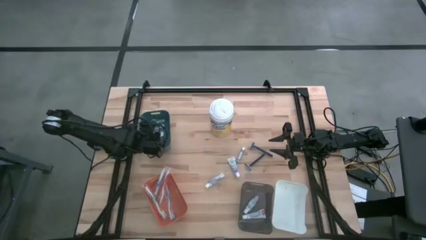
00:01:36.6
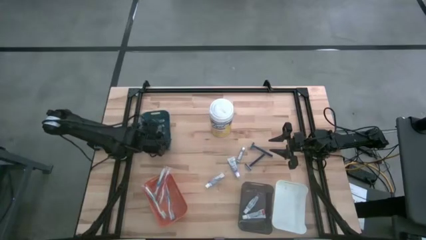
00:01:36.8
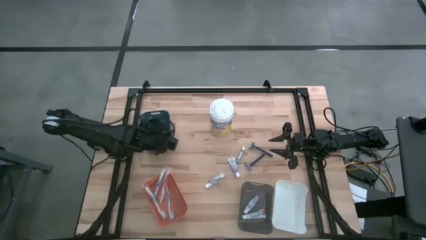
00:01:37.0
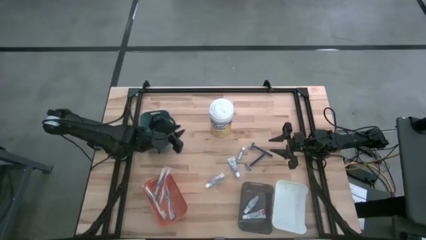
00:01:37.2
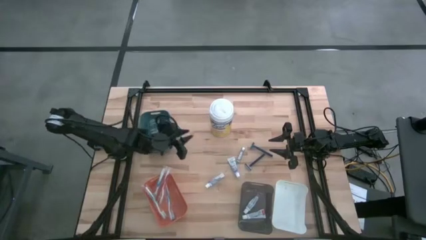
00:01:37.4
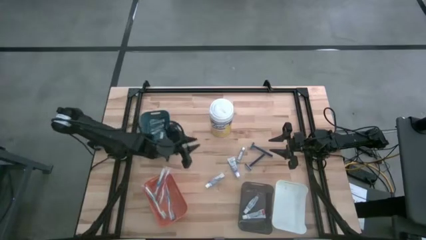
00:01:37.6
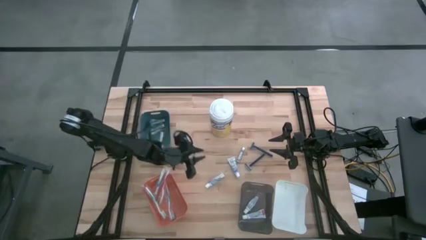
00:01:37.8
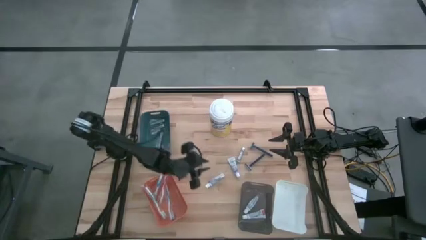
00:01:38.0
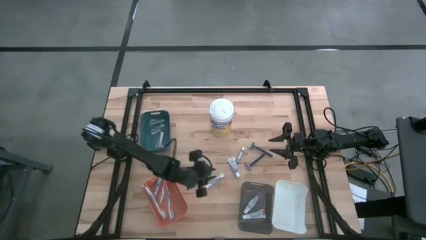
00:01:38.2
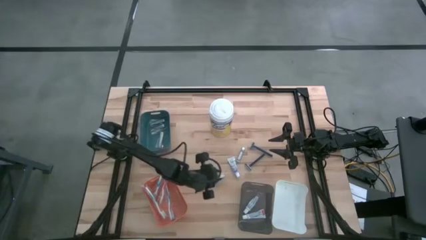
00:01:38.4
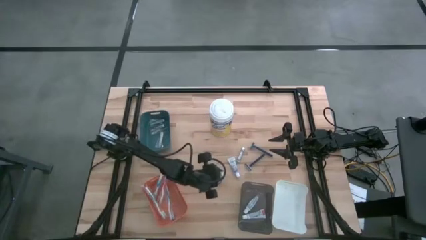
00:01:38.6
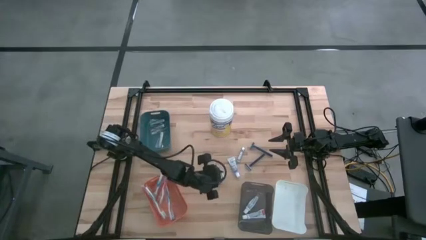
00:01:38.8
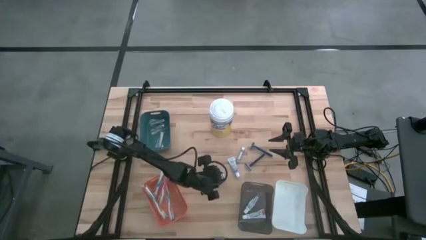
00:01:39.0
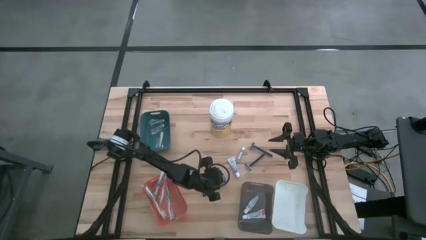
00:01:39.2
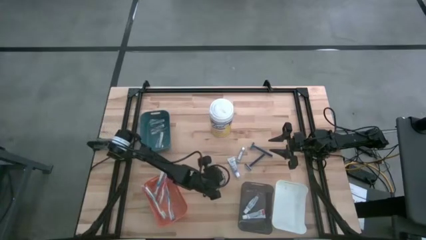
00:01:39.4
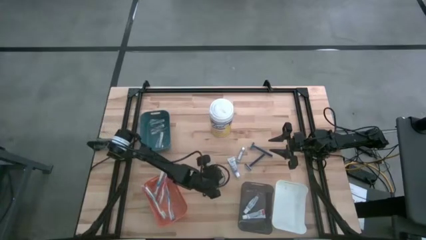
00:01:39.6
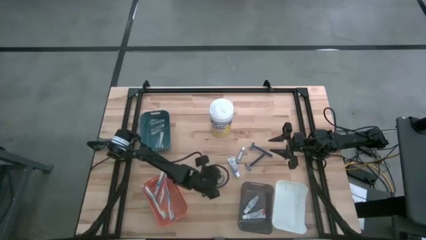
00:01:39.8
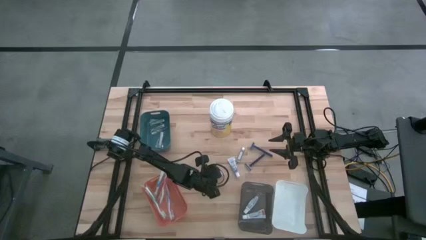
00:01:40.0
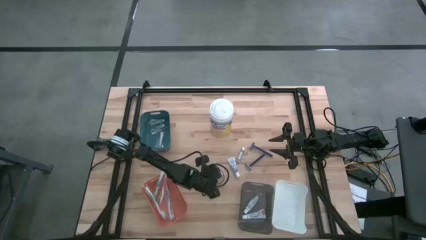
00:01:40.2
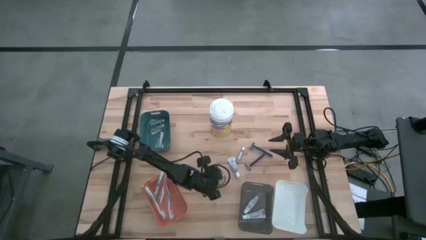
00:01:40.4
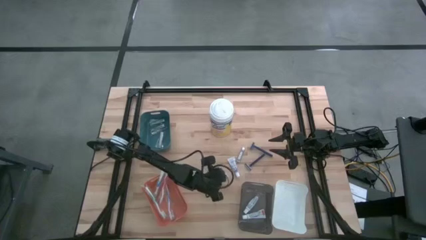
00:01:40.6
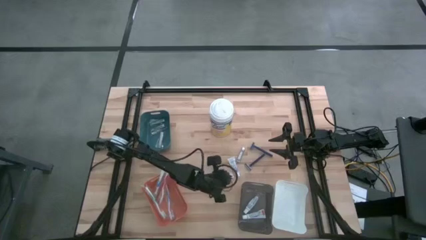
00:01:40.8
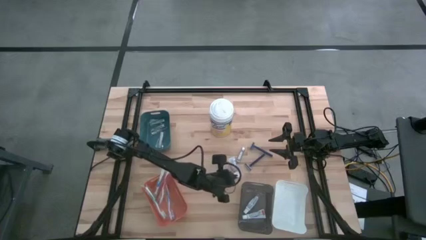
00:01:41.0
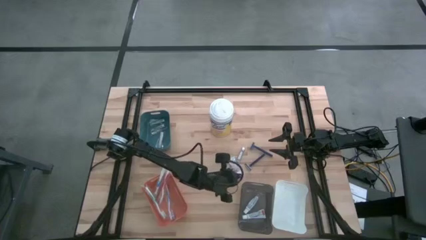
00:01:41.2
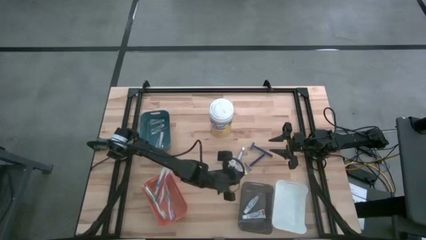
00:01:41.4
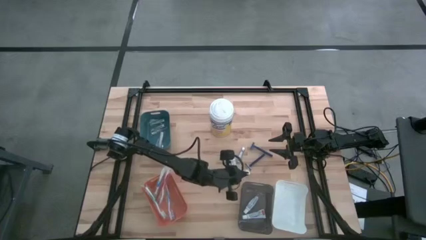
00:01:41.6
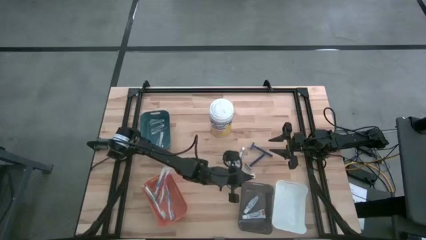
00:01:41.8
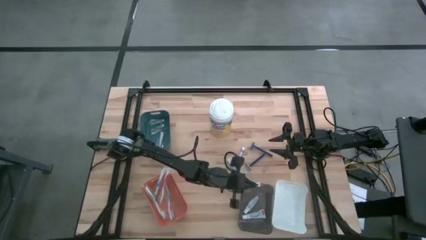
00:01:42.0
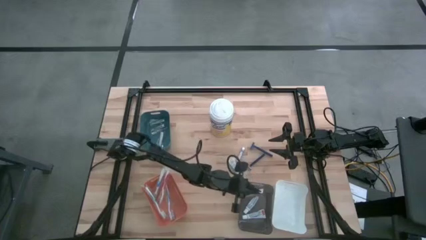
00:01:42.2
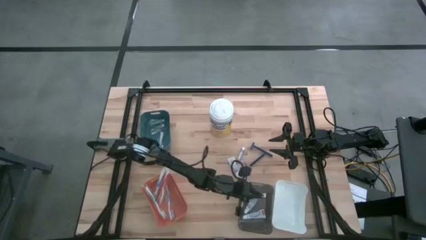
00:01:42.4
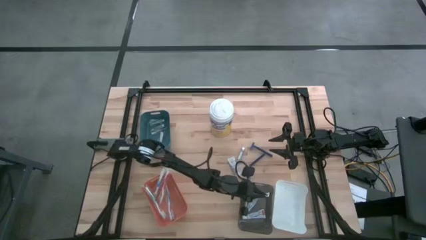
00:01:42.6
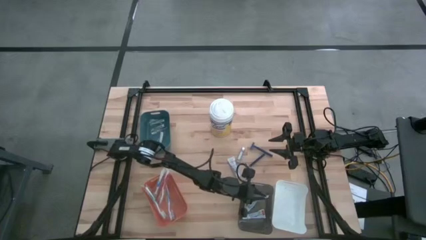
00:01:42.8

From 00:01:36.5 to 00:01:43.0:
Task: Pick & Place Travel size toiletries
Put the white toothpaste into the black bin

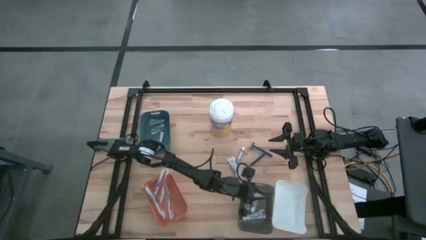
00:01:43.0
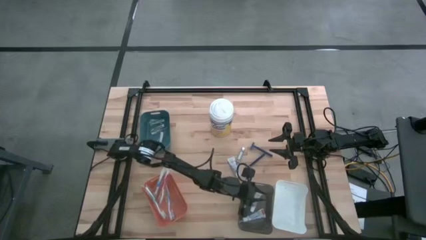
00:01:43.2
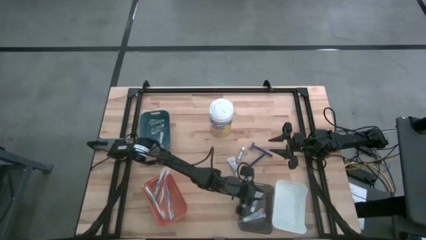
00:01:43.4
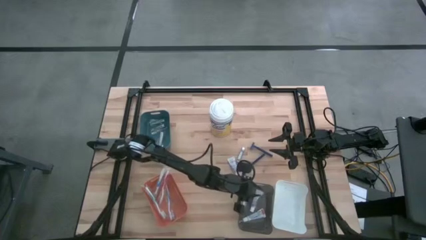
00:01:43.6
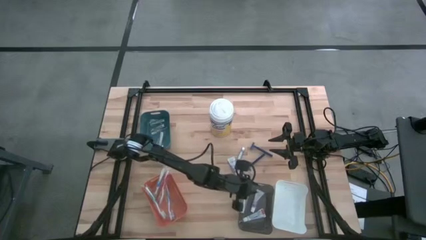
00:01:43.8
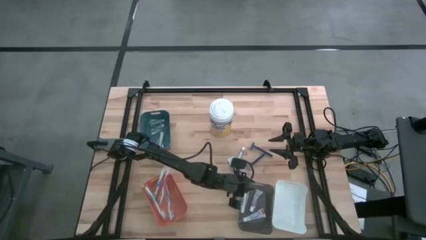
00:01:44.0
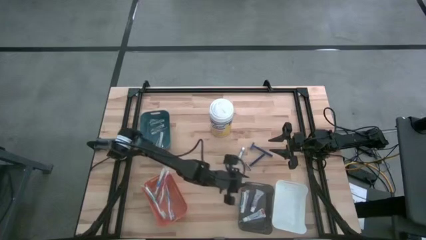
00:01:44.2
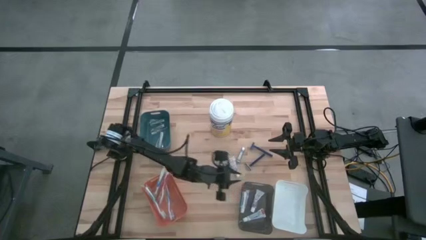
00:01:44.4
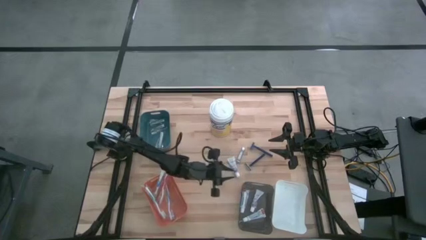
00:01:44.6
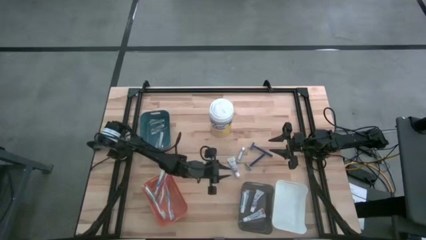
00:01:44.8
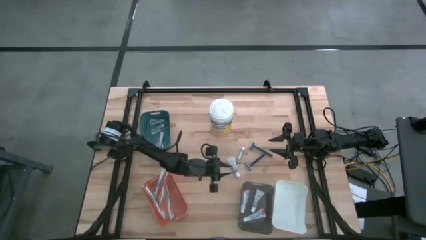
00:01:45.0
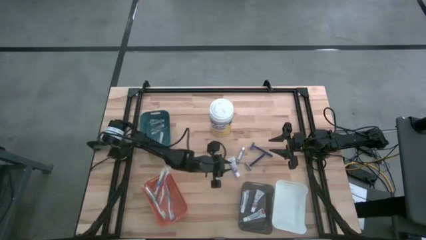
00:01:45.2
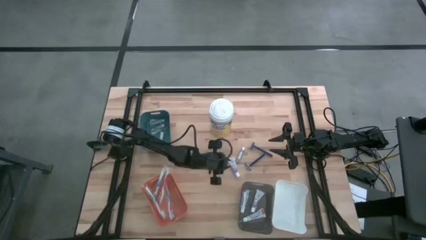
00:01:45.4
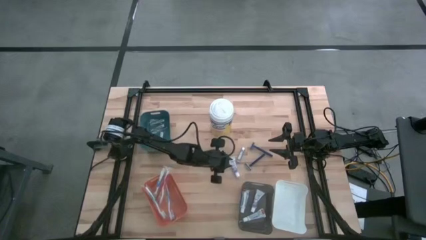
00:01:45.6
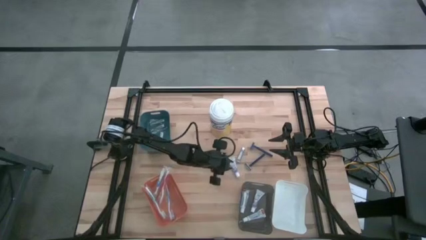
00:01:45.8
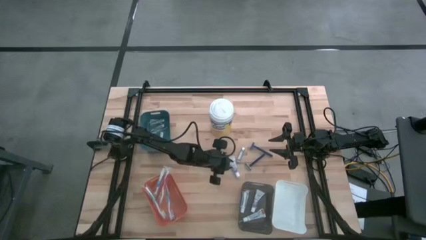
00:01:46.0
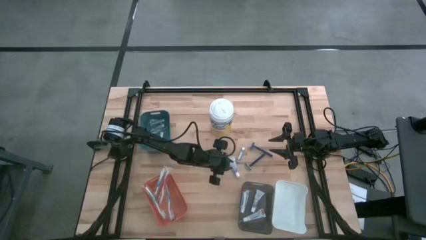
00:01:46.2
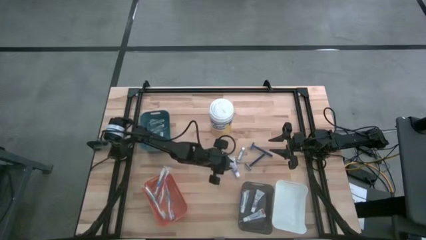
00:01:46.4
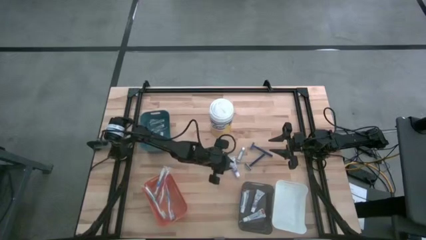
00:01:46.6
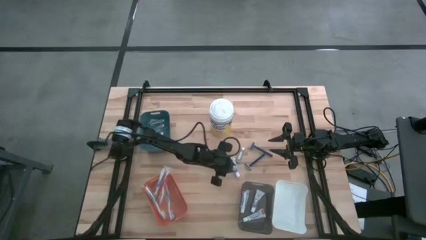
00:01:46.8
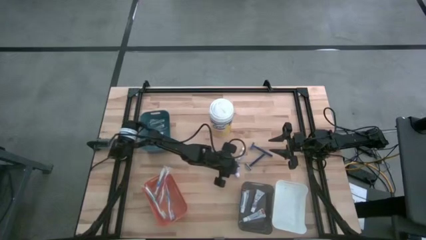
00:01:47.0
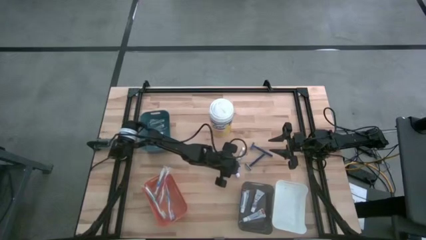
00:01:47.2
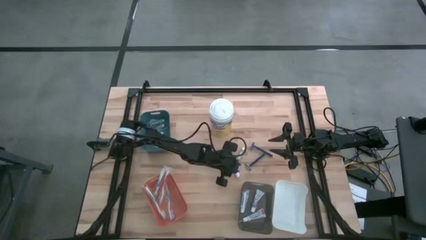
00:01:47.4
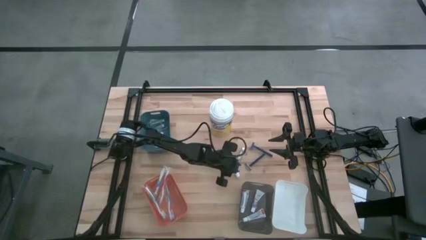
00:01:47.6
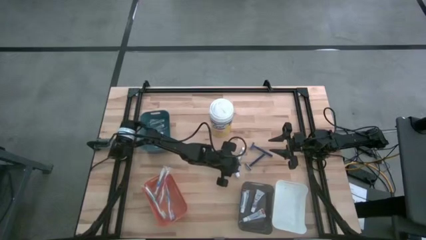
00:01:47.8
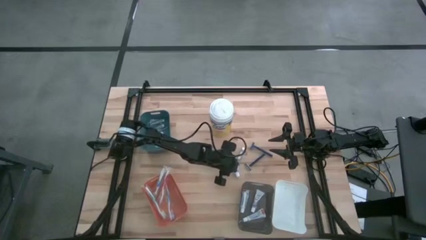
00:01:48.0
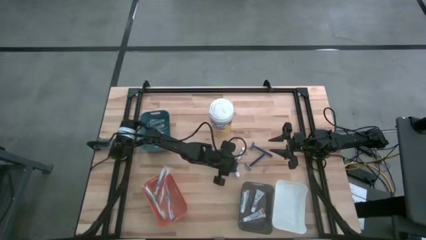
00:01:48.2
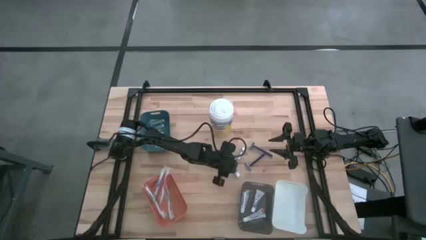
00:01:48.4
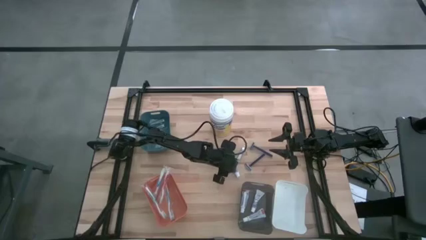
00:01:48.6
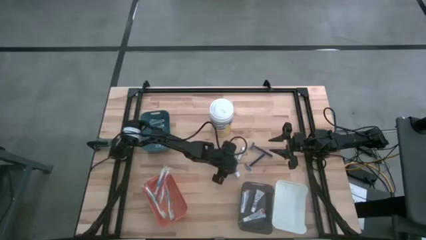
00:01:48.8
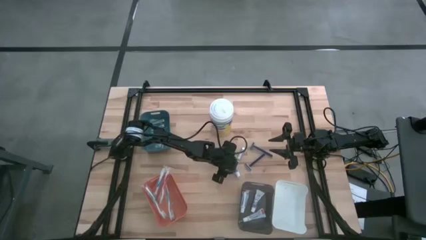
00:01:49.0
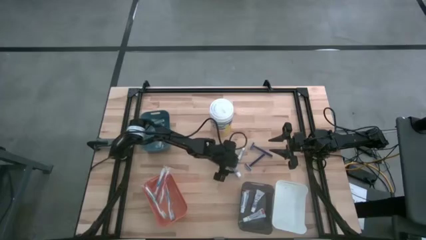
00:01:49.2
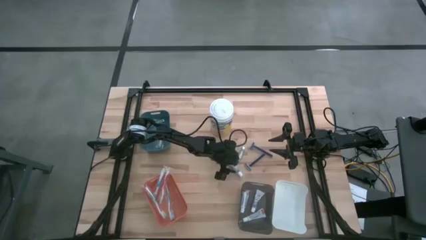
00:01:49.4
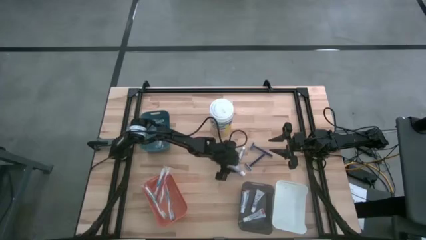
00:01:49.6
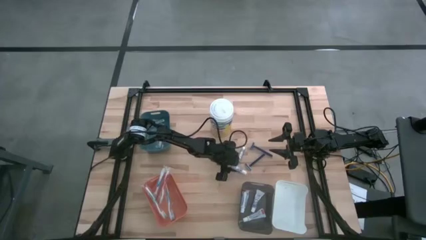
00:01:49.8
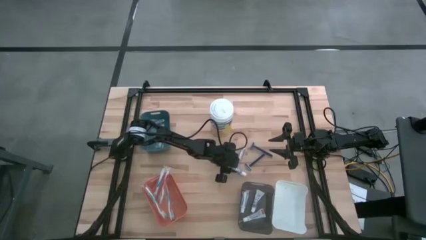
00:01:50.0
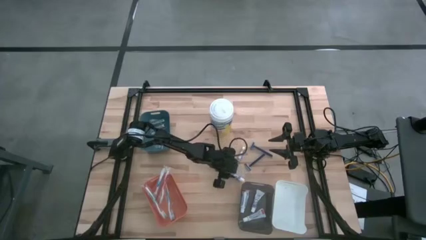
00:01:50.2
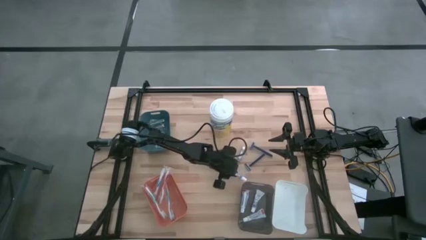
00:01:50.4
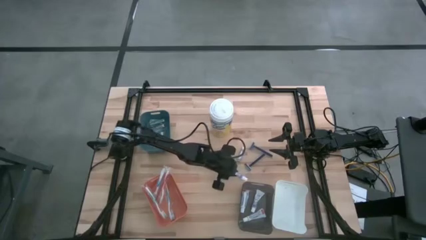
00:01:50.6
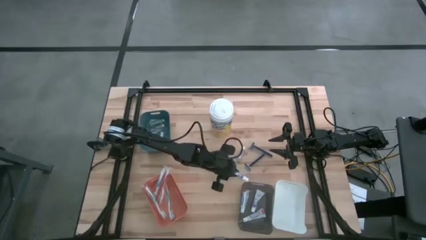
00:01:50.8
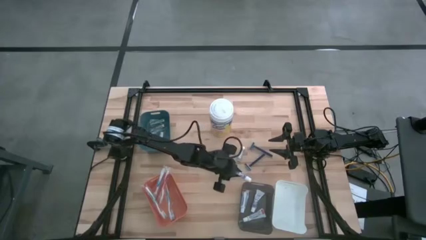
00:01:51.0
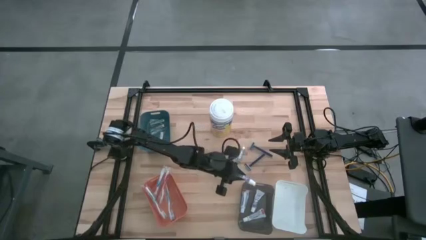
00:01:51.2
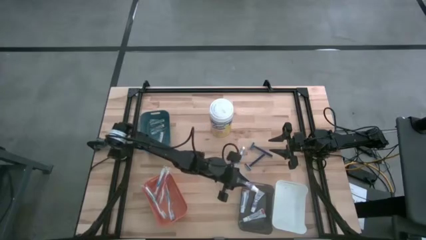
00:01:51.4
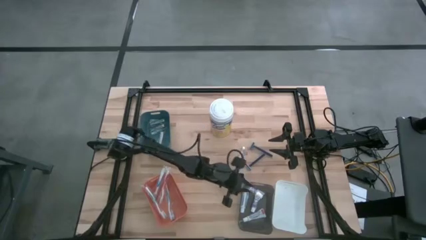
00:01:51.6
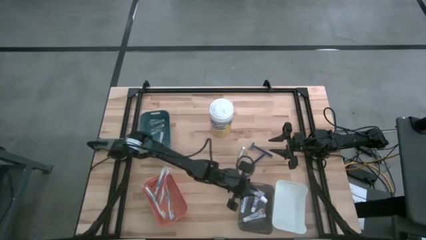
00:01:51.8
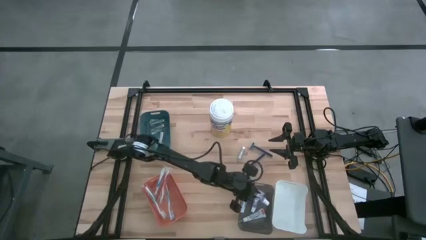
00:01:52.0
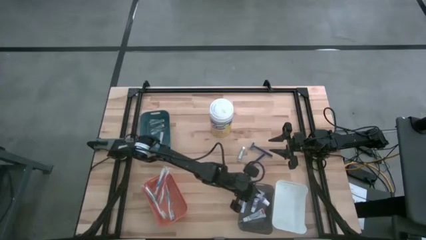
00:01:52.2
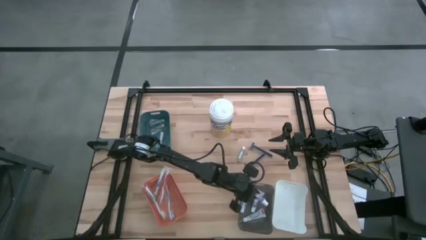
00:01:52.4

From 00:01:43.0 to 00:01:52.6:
Put the white toothpaste into the black bin
